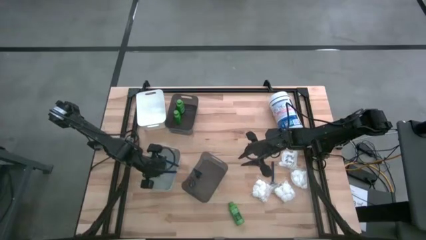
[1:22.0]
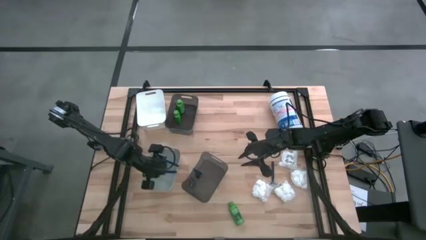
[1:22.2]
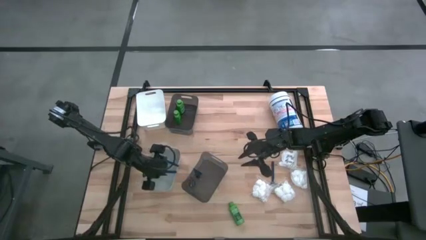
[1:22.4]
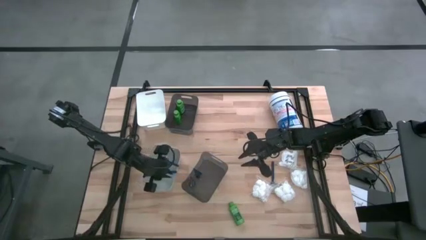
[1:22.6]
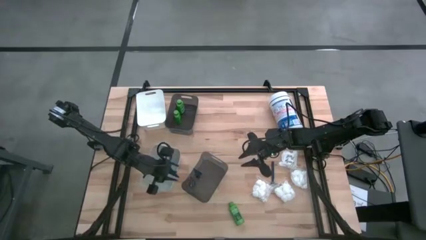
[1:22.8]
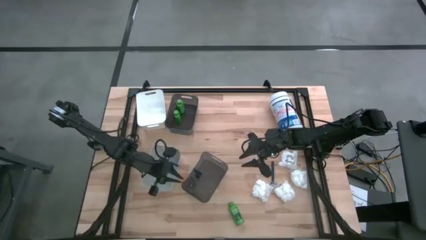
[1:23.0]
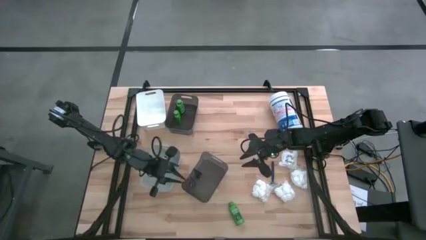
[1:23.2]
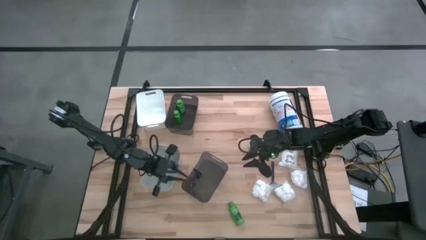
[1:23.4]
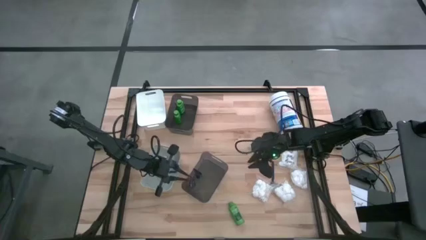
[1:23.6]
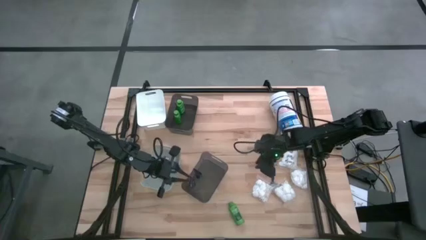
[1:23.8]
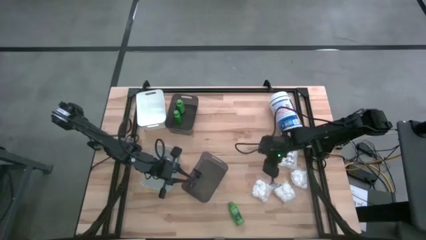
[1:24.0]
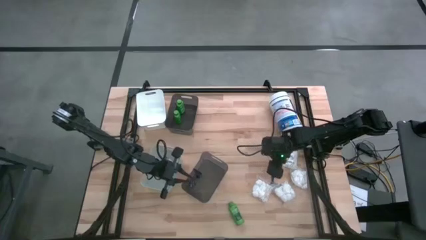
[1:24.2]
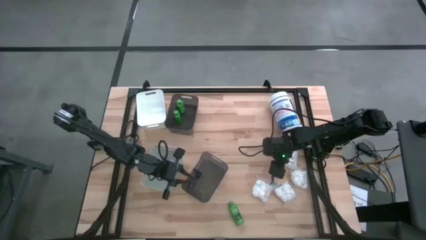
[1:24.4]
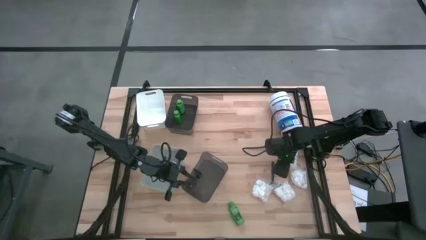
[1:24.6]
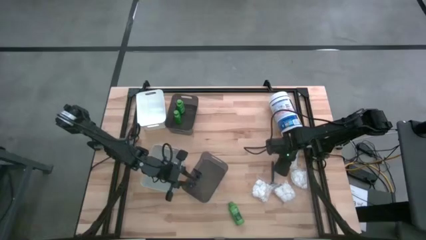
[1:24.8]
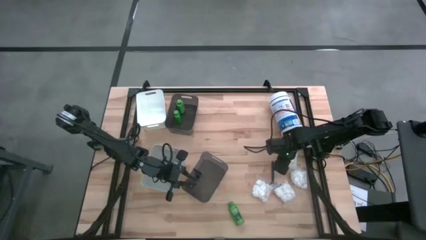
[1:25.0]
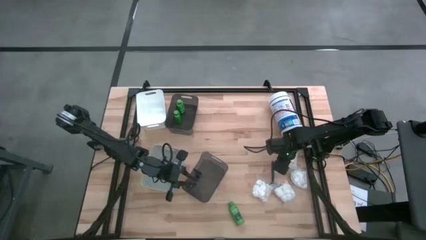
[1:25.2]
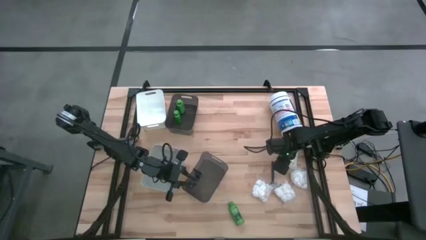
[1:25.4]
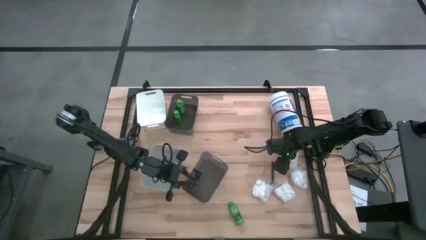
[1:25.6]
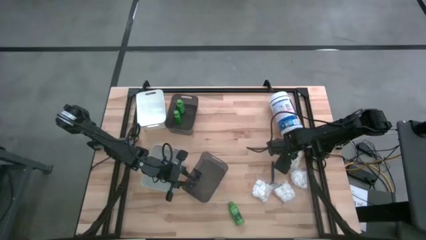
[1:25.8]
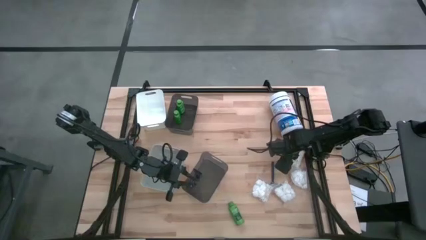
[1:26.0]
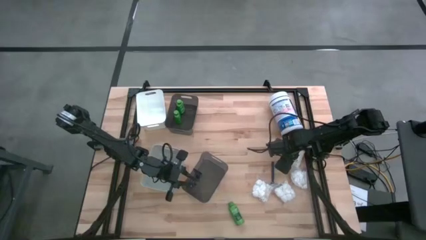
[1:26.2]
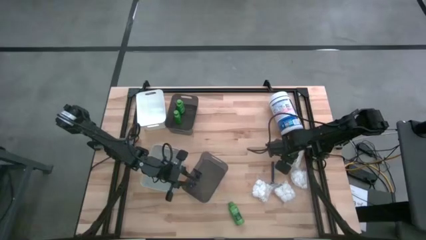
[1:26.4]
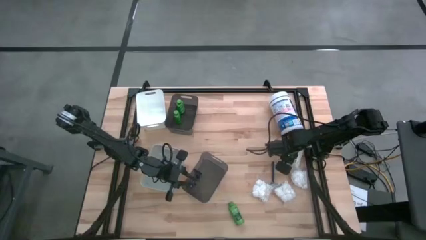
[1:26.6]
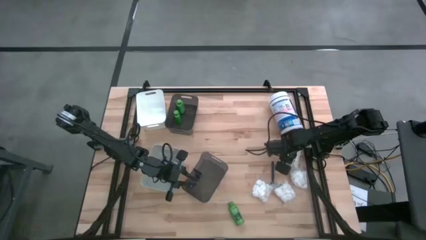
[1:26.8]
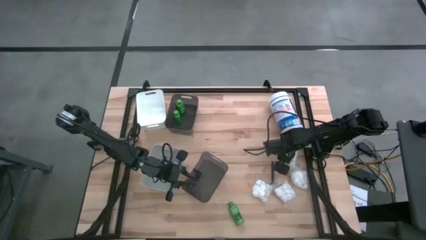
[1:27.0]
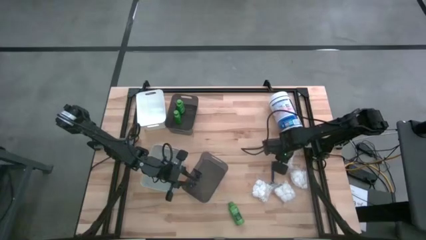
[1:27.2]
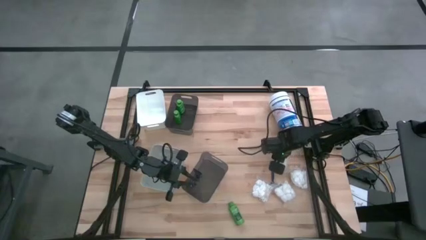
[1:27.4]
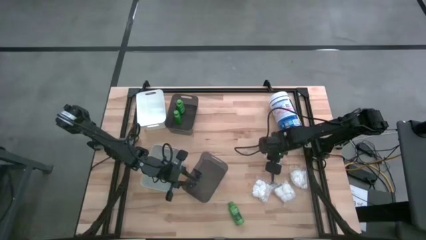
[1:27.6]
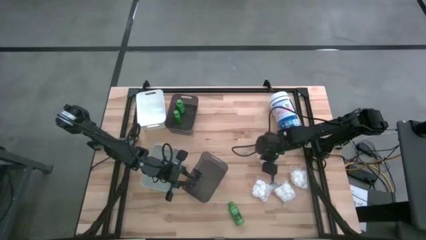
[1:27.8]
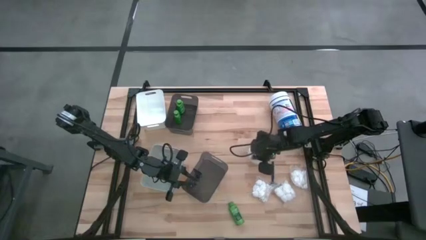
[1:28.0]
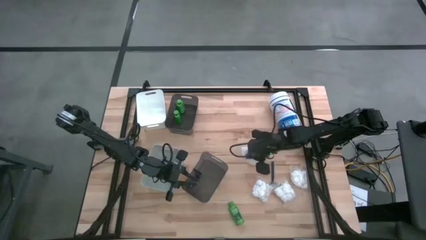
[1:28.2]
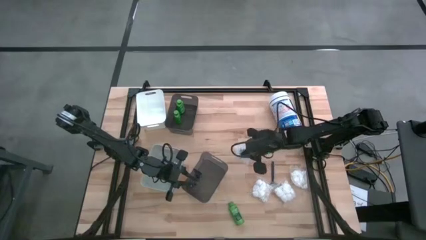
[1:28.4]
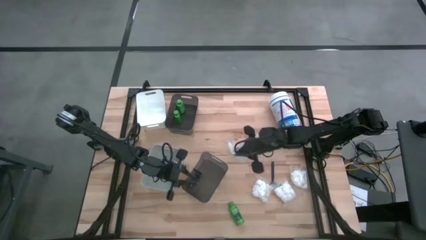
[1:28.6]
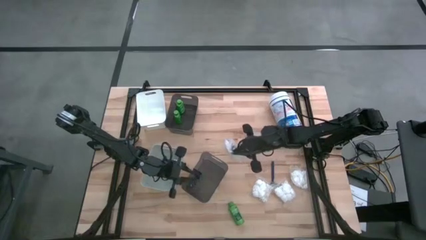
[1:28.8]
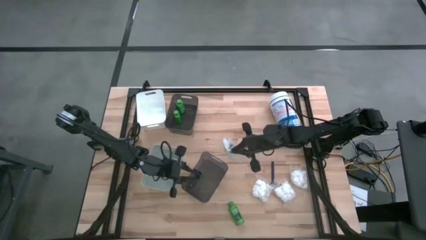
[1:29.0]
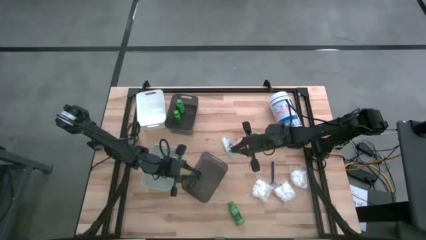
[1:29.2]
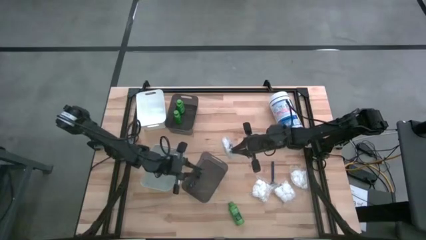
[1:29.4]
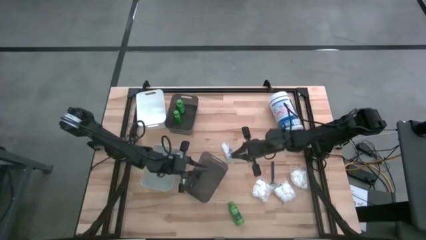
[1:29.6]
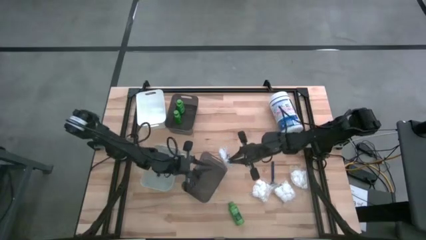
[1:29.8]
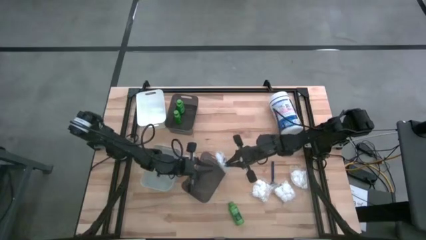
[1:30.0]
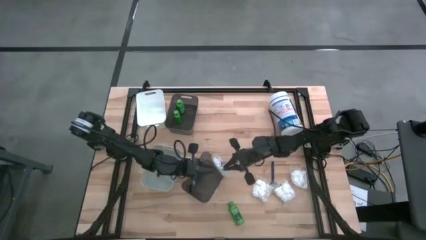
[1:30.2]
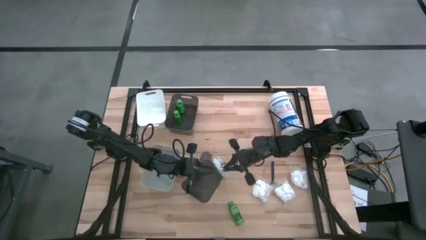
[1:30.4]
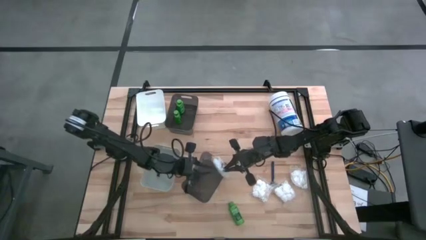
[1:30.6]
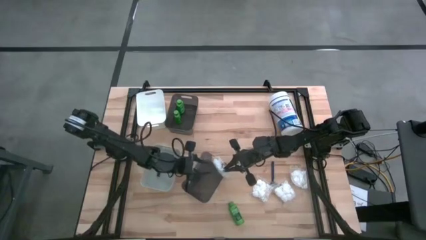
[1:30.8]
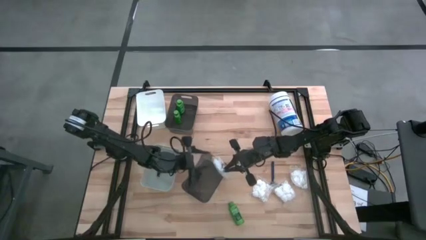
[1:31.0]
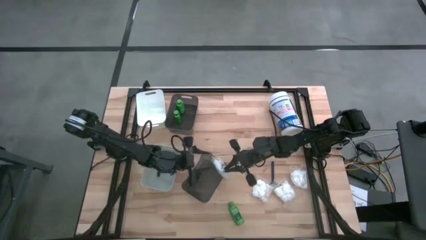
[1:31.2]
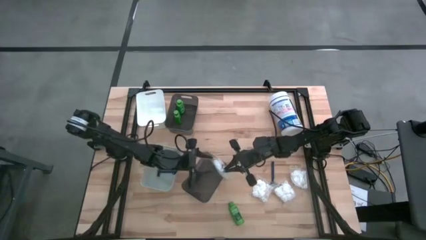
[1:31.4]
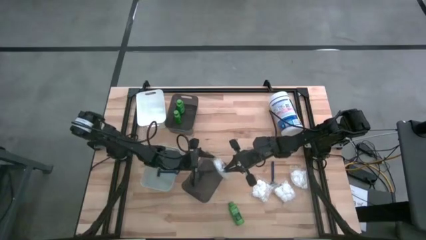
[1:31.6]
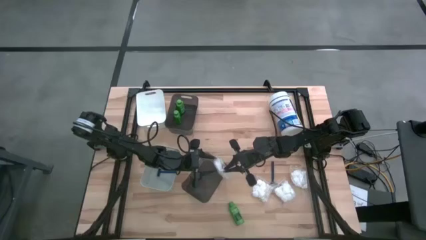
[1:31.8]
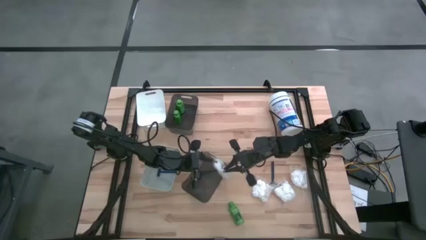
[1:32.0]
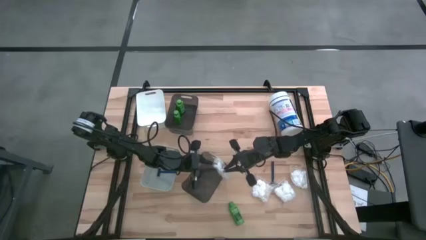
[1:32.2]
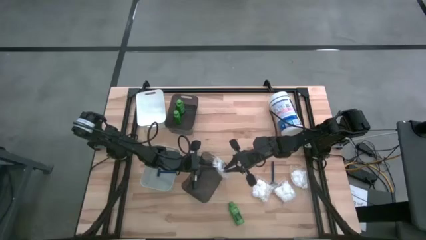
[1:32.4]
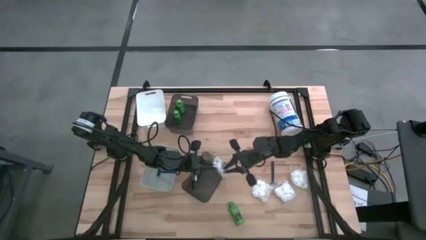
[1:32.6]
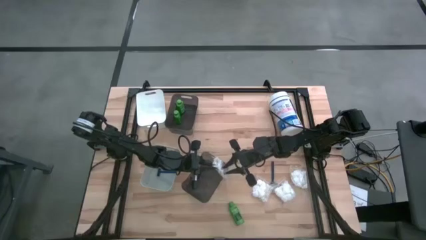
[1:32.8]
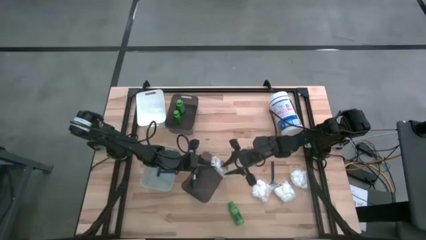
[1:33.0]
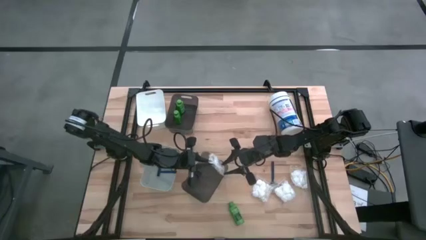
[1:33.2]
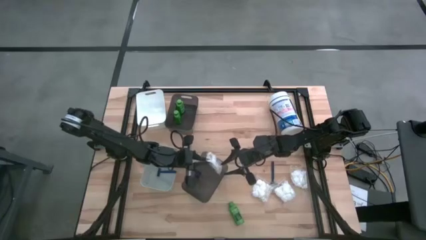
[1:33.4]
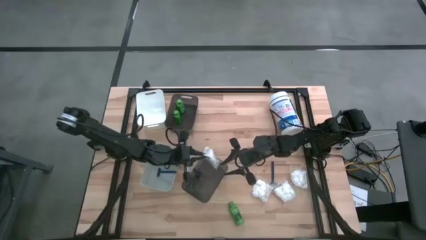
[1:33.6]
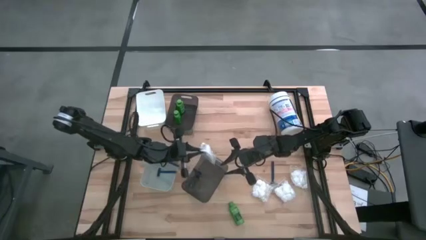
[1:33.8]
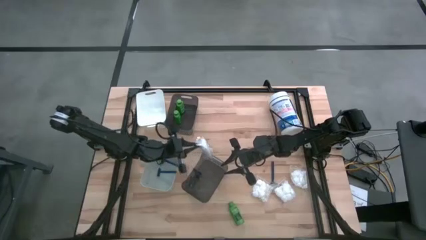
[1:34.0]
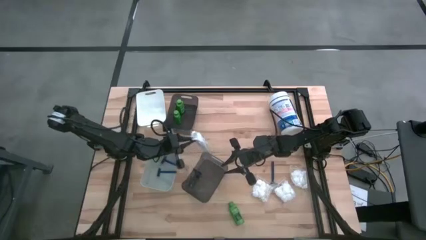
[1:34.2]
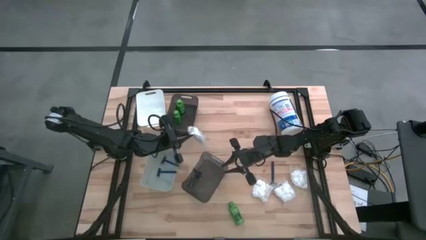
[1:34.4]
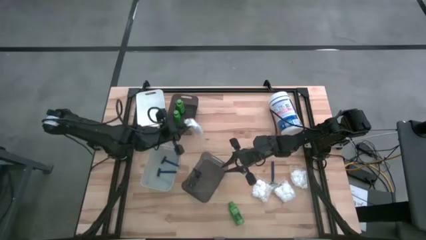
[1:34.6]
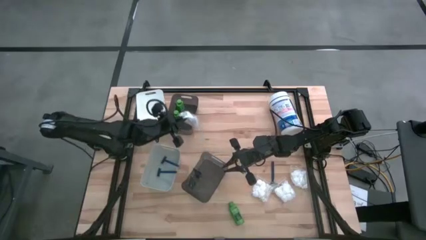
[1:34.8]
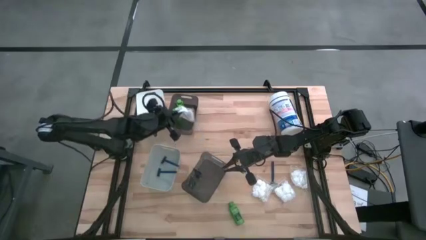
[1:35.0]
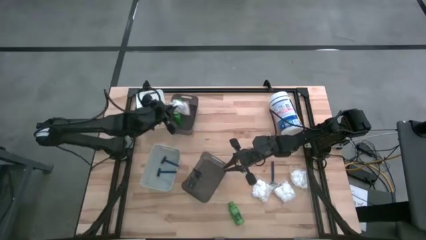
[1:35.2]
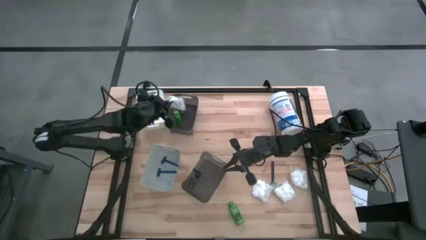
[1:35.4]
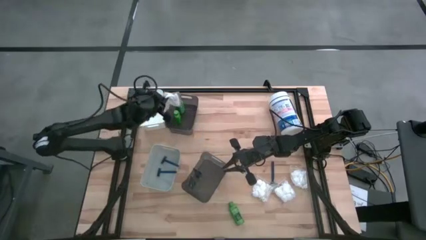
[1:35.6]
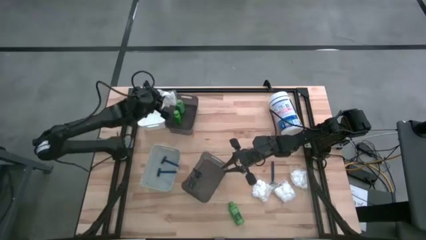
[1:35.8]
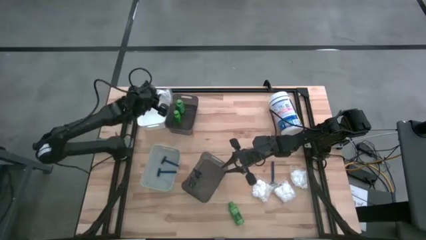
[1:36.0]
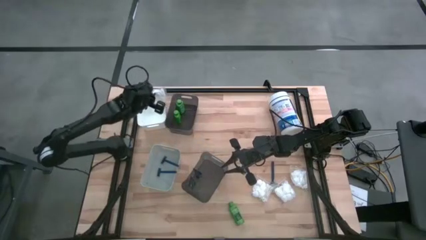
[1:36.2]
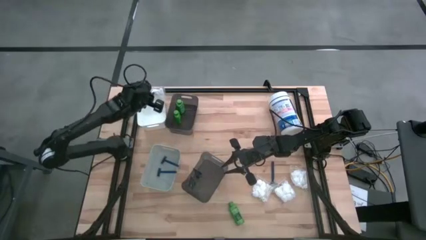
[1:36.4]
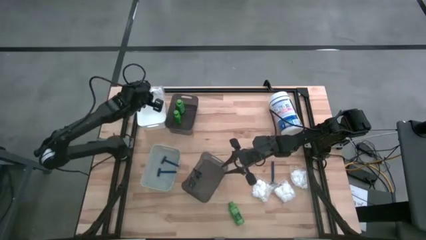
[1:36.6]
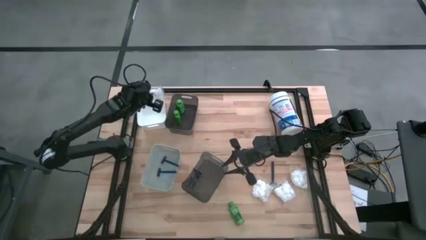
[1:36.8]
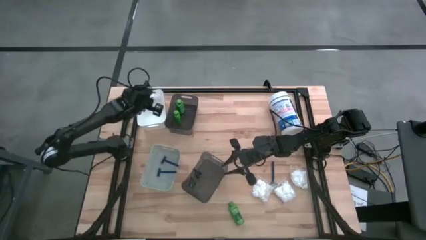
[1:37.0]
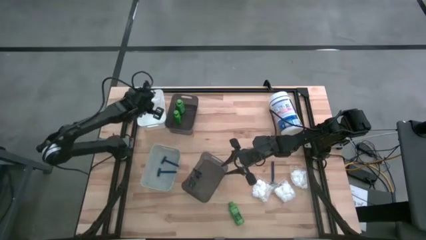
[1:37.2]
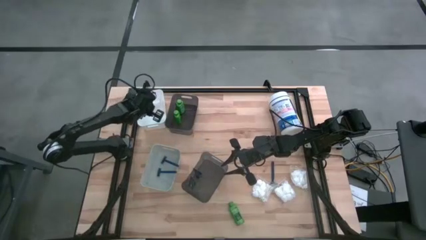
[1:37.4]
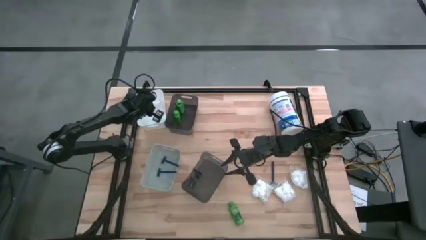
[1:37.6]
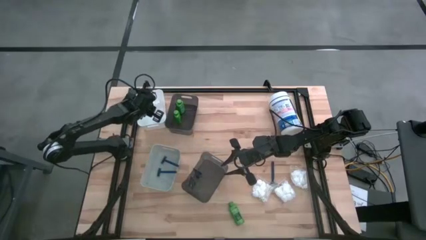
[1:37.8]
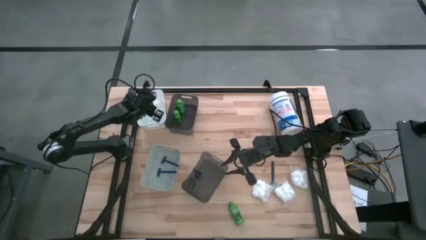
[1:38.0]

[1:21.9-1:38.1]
Task: Pick & Place Travel size toiletries
Put the cotton pack into the white bin
